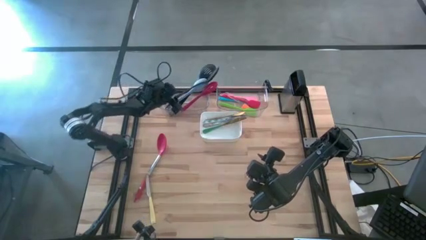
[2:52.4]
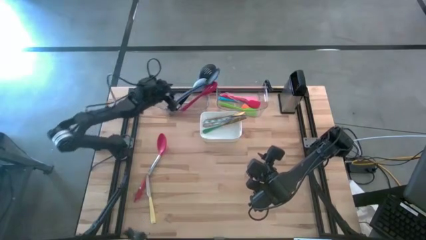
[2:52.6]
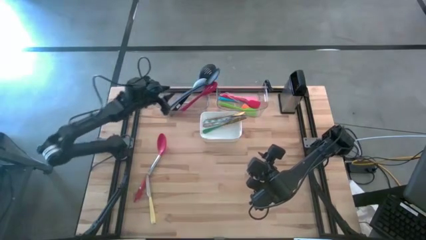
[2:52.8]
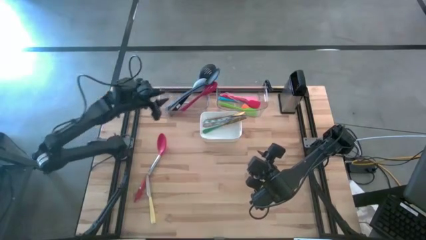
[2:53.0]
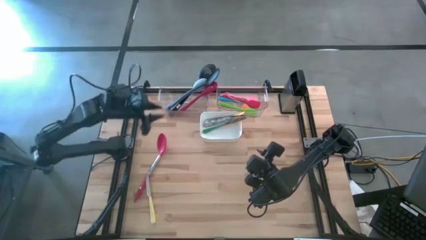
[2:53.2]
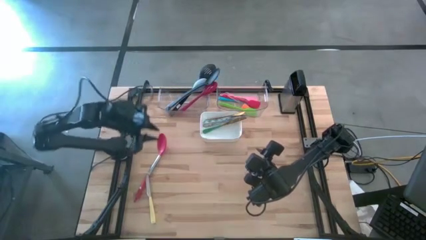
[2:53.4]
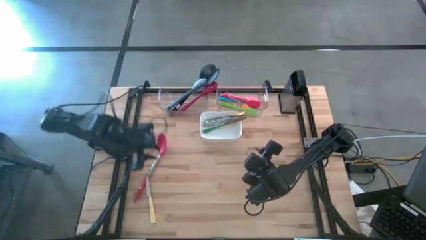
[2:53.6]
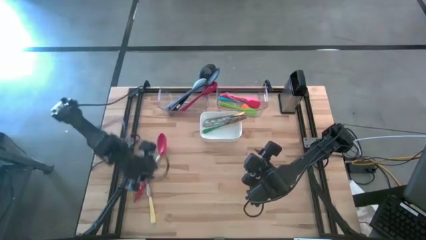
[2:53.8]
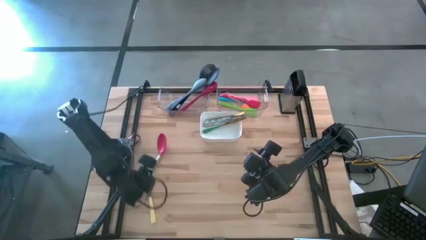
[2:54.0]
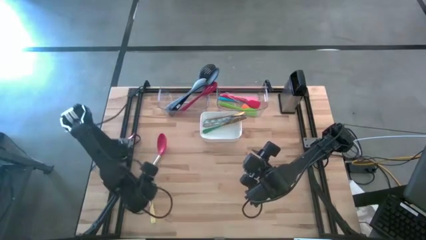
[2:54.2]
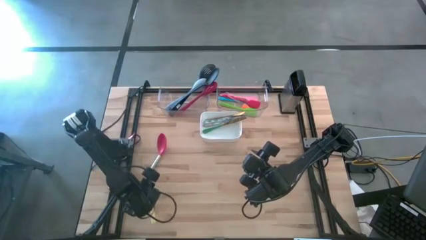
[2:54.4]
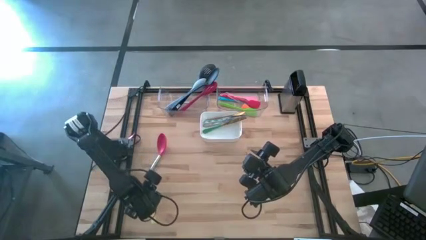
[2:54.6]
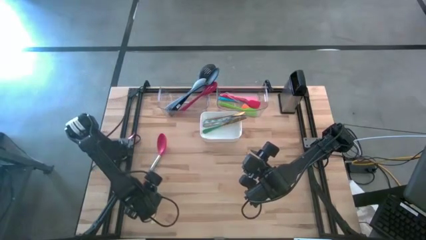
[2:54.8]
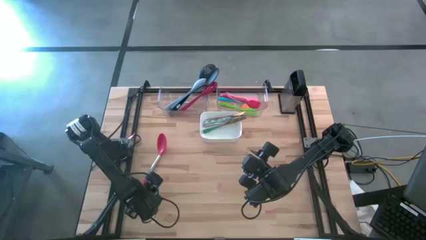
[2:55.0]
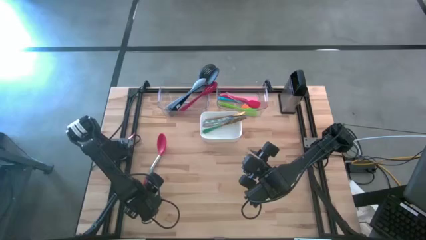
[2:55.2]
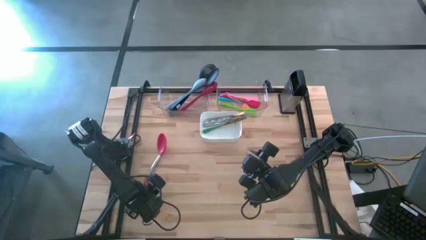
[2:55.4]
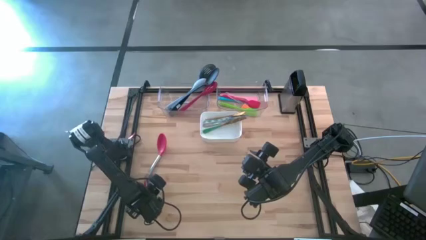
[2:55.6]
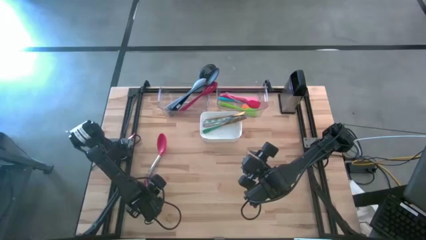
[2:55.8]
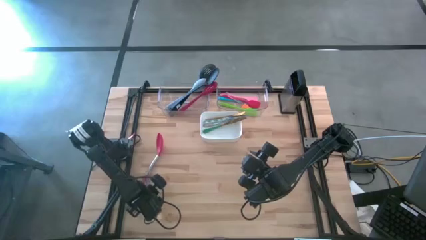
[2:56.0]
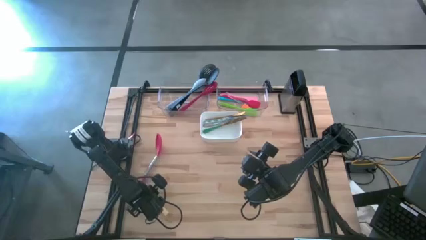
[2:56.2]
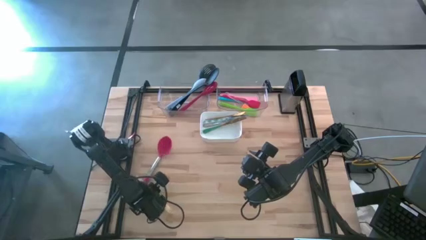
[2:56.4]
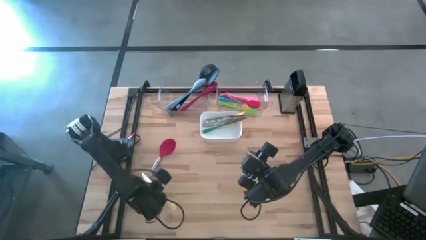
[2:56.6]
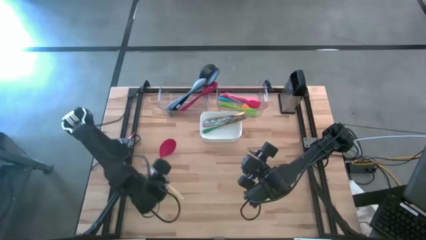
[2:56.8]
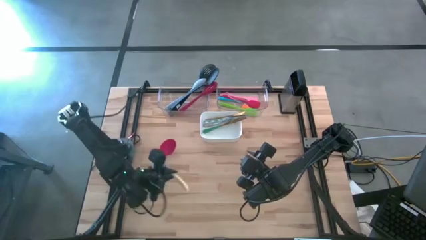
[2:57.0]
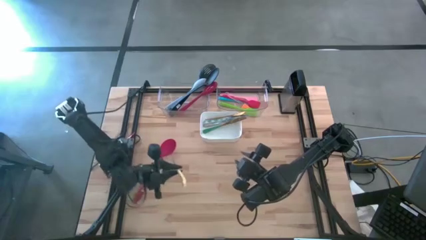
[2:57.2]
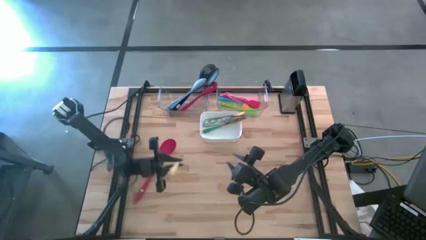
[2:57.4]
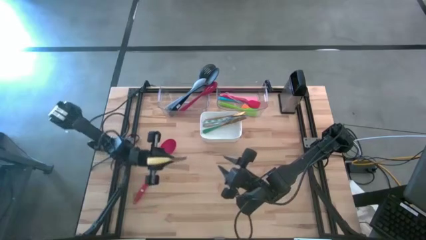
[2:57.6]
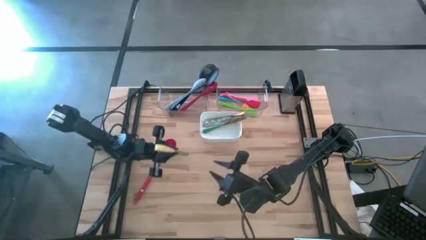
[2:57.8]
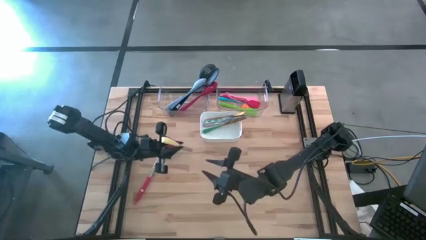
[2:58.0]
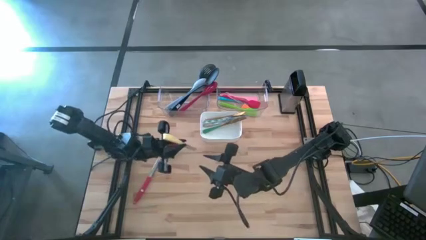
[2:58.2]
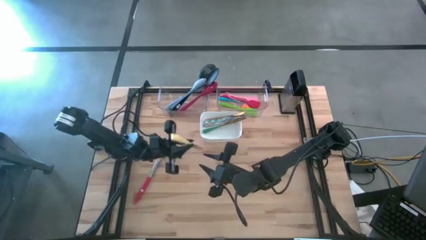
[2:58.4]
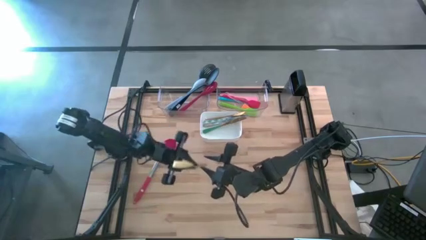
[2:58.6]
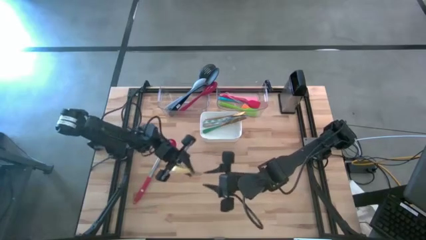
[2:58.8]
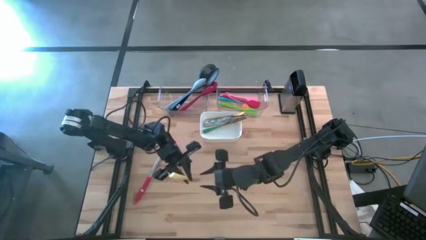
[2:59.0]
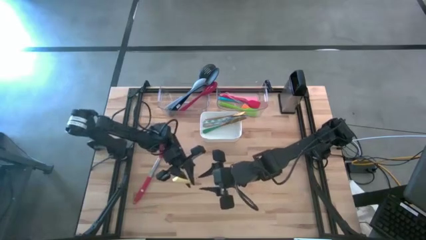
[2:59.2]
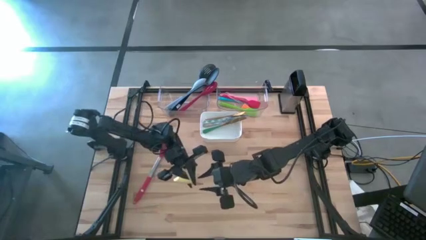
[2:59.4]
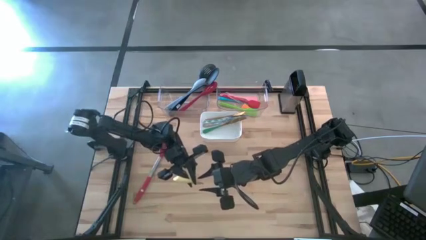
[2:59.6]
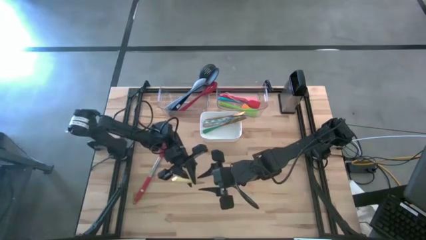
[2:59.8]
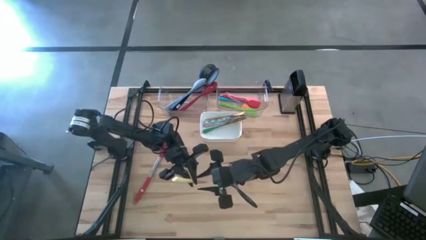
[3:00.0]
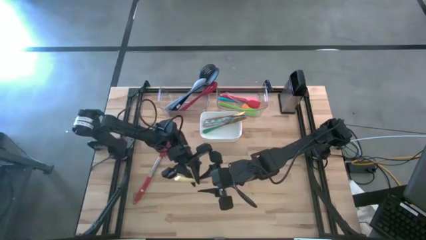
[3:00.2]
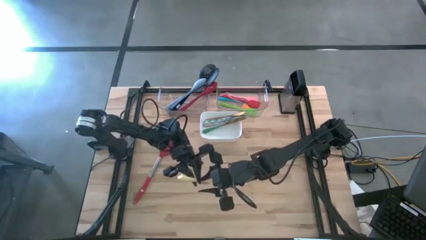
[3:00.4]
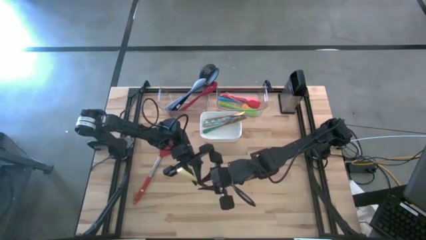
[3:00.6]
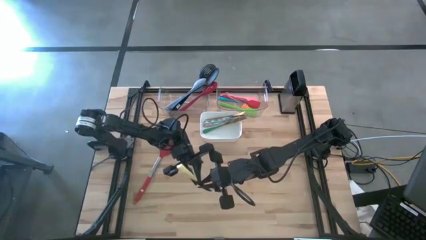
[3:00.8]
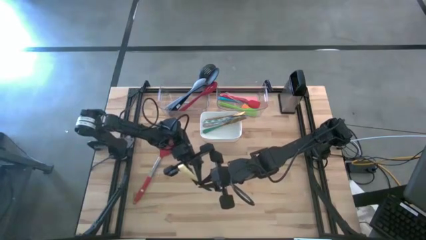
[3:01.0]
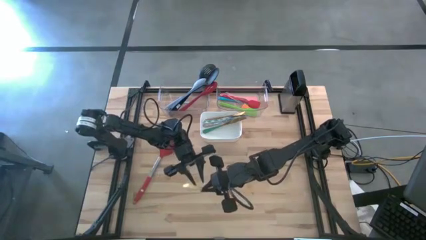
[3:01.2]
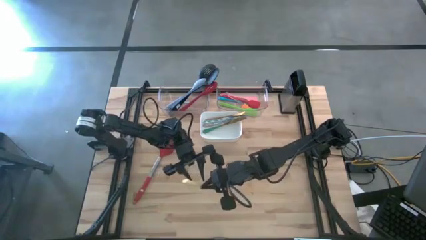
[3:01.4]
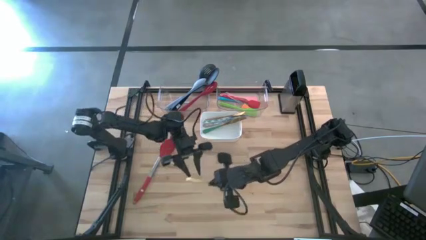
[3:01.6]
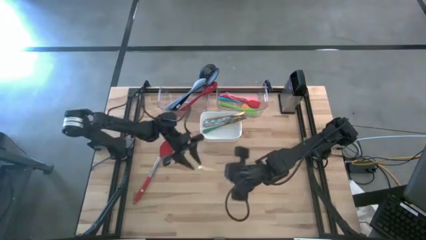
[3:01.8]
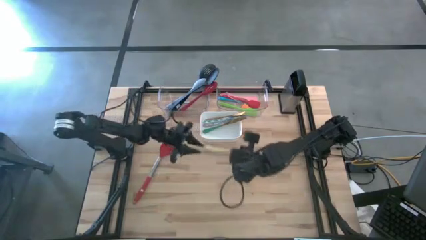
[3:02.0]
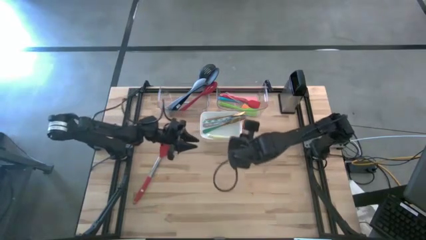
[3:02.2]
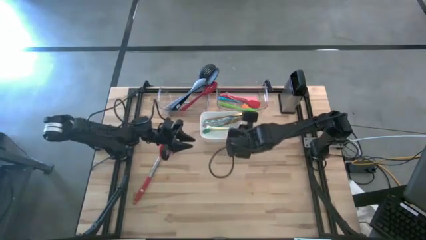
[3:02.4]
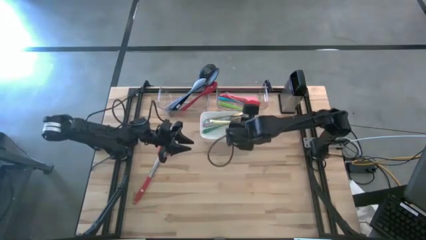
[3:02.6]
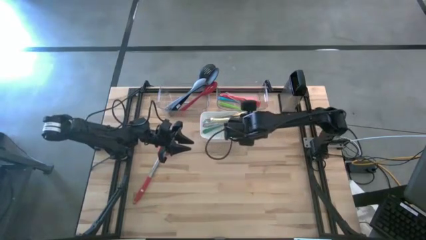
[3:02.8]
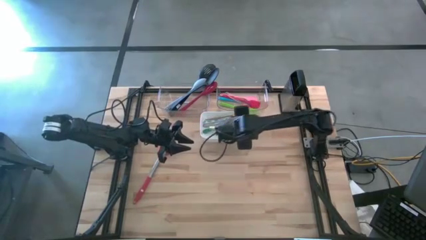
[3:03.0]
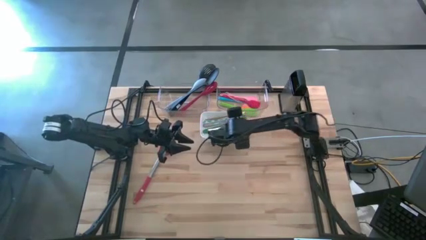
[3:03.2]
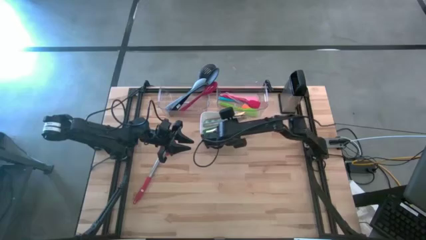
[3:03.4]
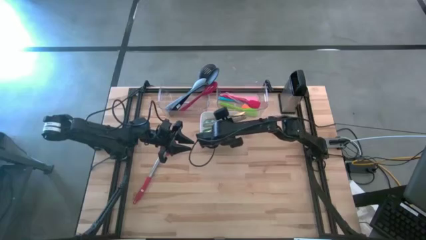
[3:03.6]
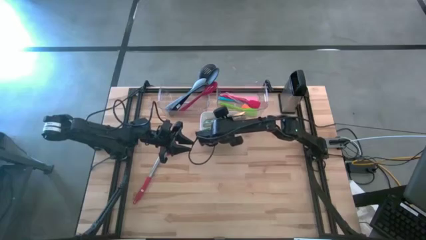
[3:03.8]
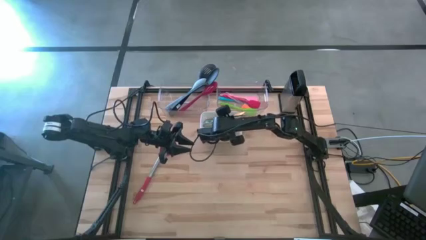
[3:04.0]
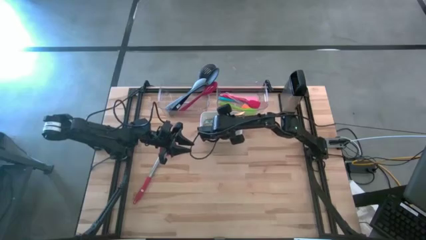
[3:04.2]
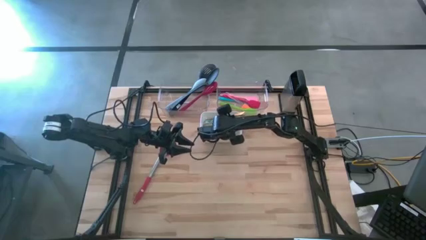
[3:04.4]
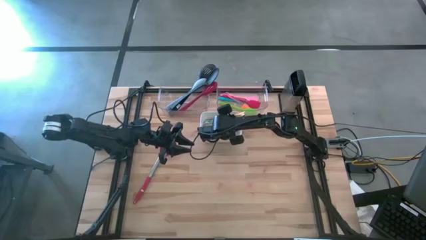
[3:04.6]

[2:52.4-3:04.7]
Task: Pick & Place Kitchen Items
Put the yellow table knife into the white bin

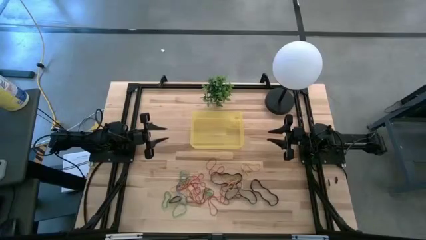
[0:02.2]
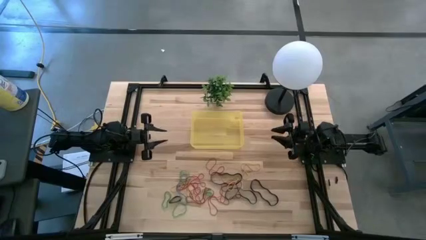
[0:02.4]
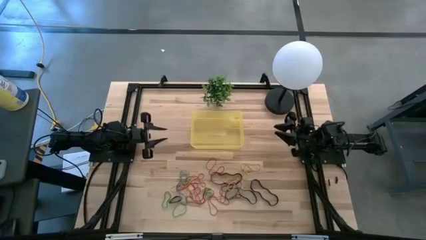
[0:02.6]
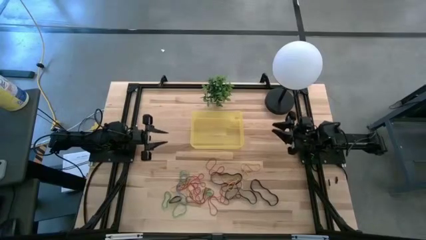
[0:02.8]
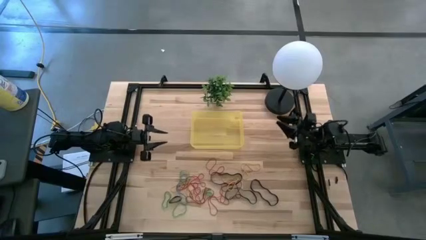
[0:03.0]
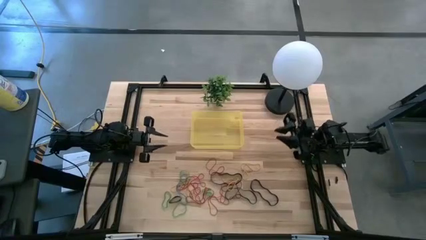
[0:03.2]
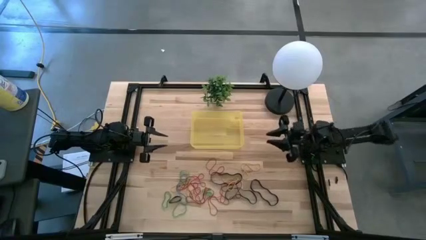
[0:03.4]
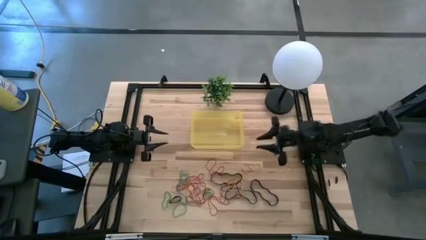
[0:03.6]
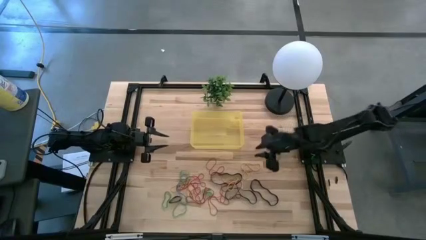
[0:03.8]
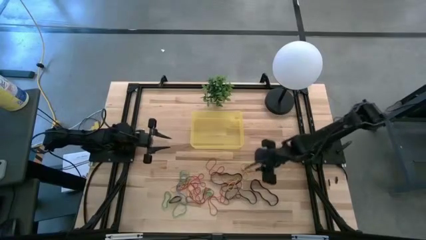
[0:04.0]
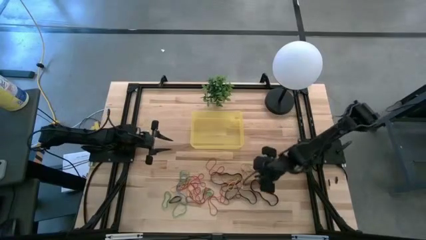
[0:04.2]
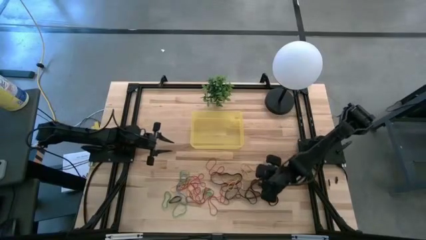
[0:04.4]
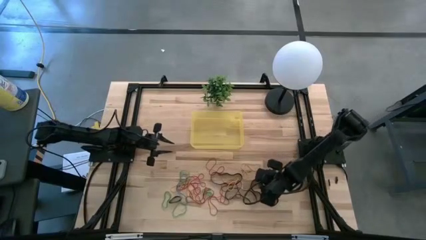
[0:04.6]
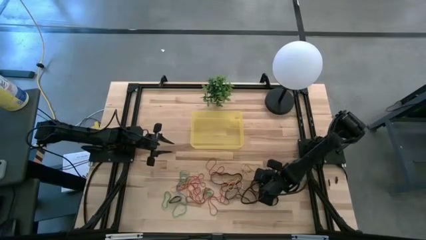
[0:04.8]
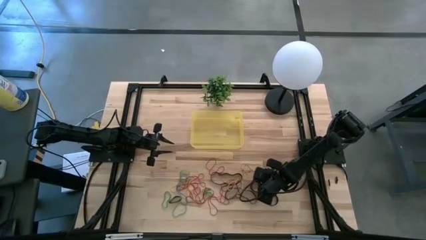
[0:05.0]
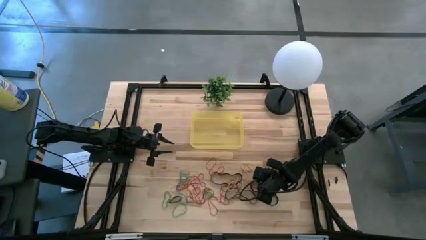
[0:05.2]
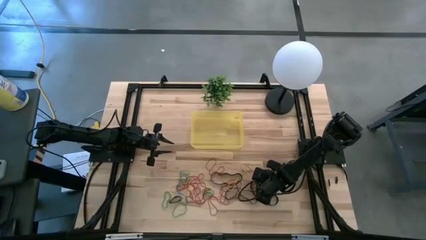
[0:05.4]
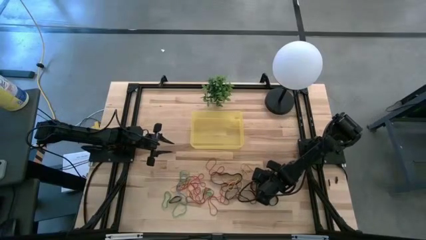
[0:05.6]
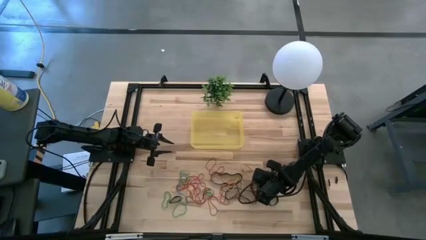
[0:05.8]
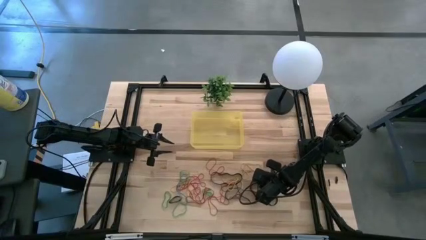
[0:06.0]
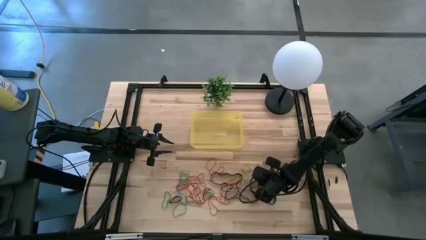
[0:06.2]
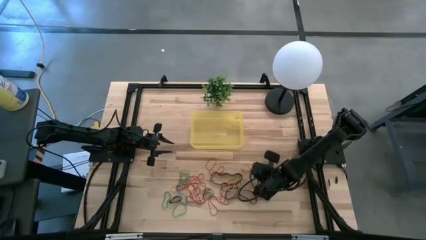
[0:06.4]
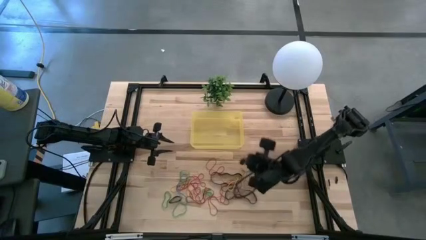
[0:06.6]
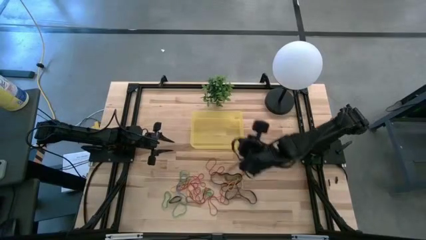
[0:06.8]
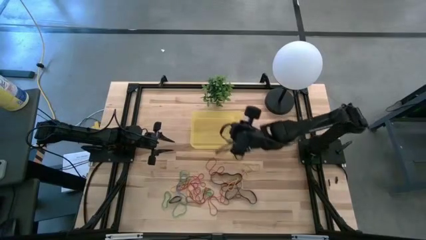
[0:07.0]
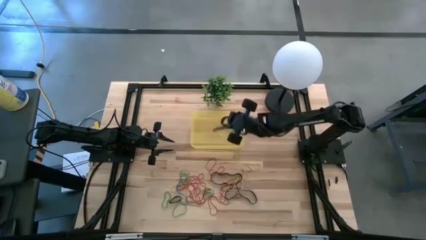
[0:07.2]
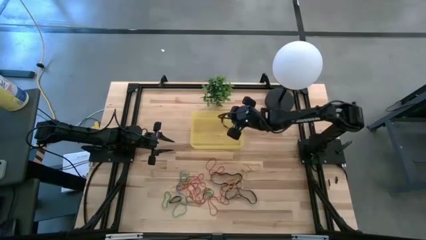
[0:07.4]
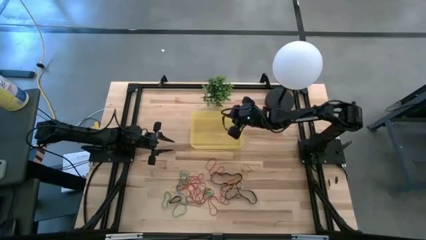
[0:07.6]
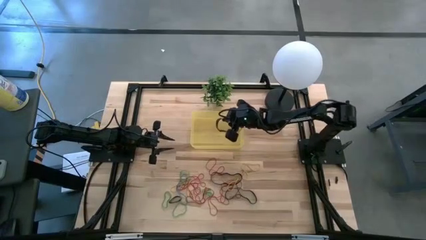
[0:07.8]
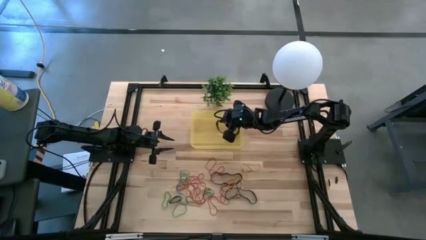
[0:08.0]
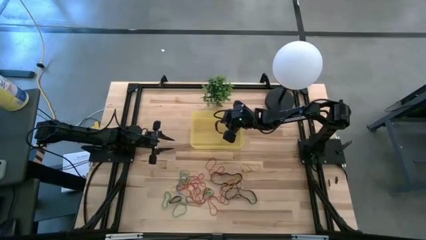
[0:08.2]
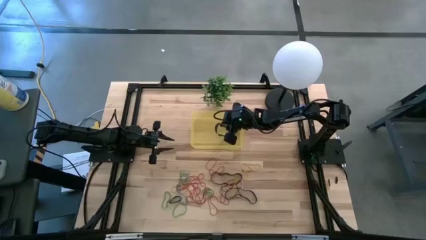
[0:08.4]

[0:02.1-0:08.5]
Task: Pick and place rubber bands into bin
Put the black rubber band into the yellow bin
